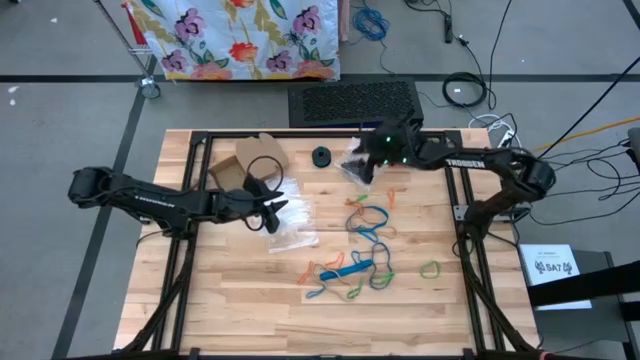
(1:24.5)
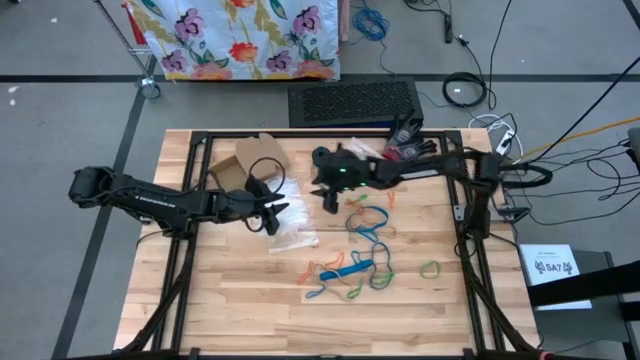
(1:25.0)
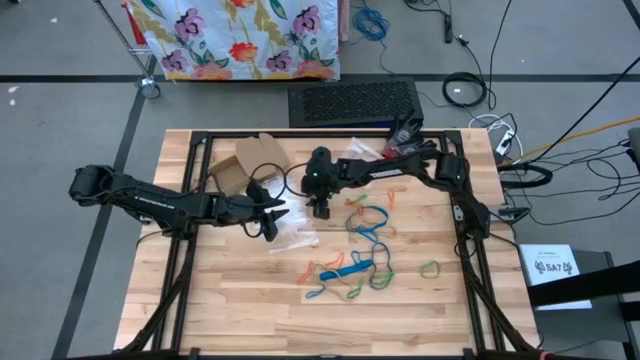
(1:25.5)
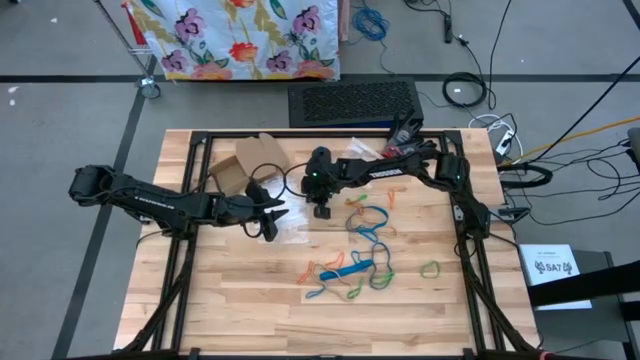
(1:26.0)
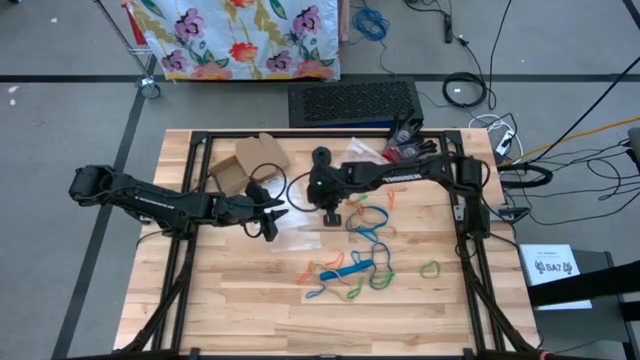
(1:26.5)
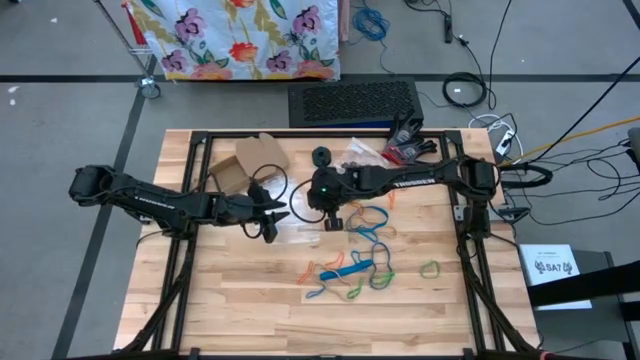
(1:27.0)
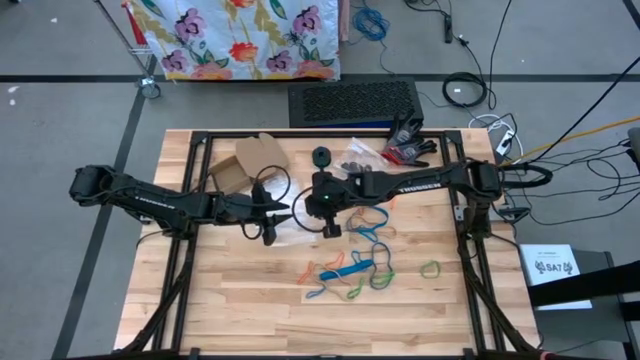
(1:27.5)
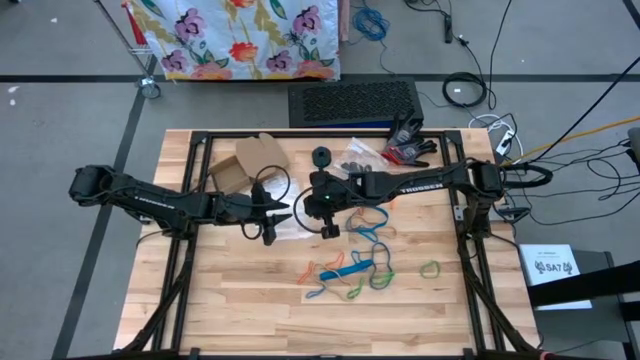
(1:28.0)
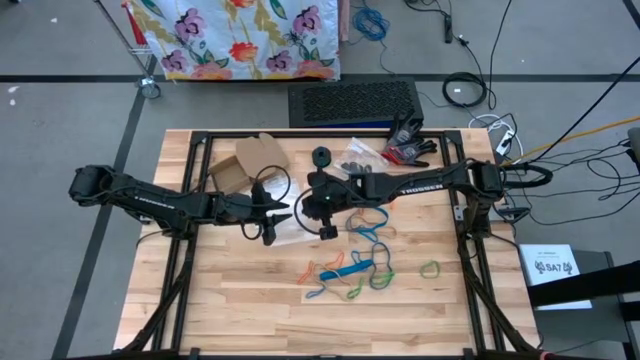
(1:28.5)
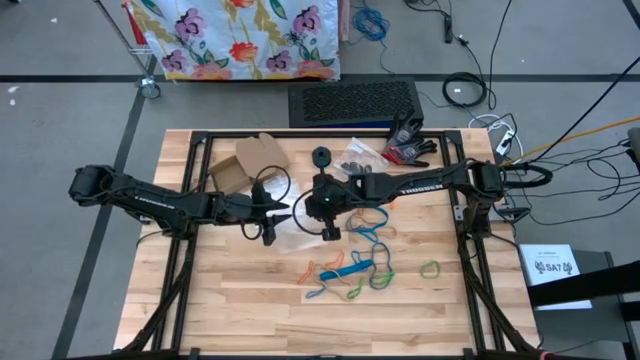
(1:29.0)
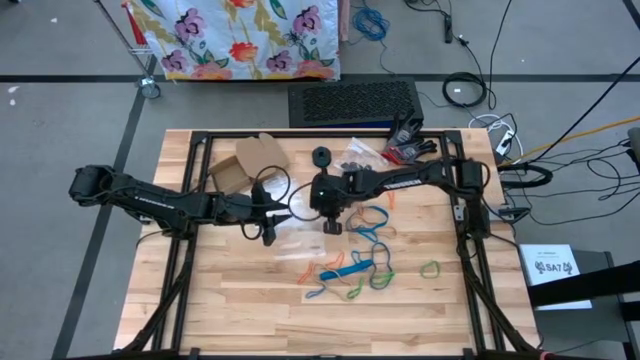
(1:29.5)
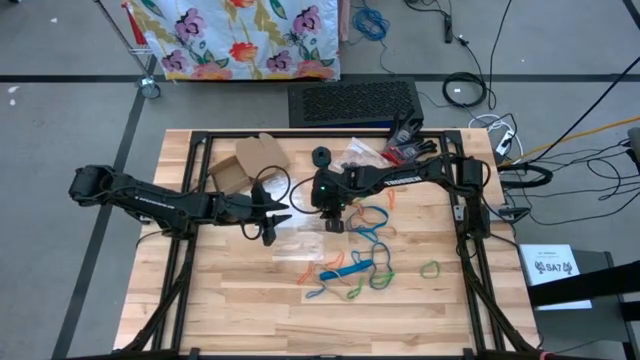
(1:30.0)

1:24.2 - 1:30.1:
Task: Sort rubber bands
Open the transparent zip bag

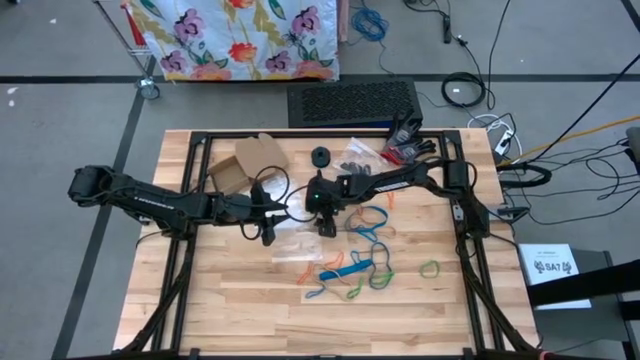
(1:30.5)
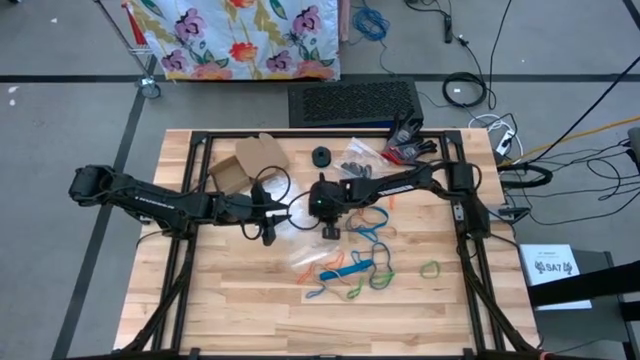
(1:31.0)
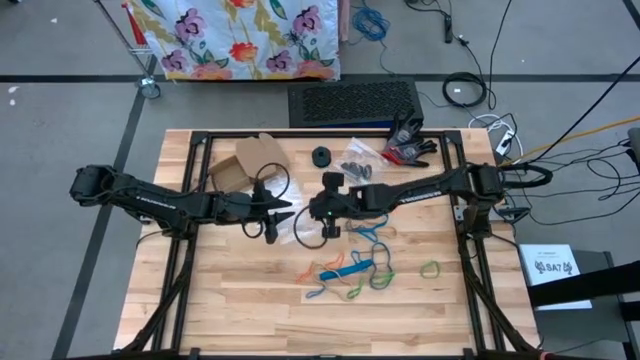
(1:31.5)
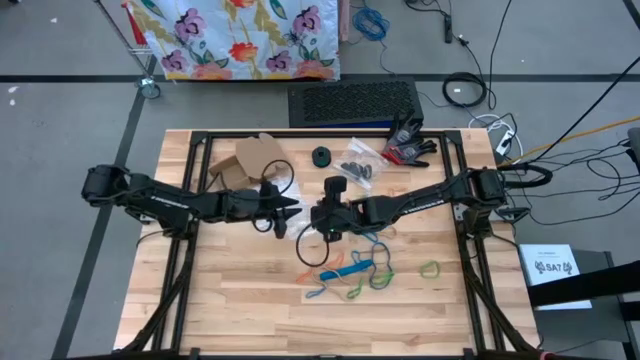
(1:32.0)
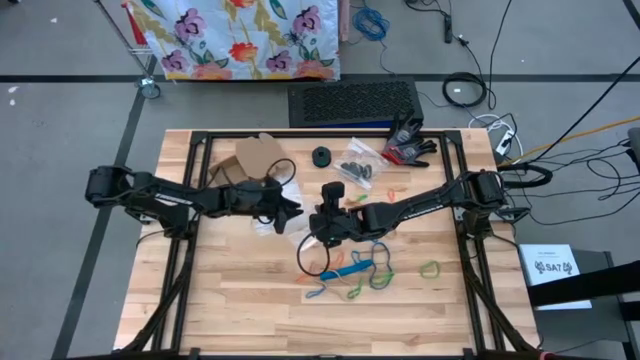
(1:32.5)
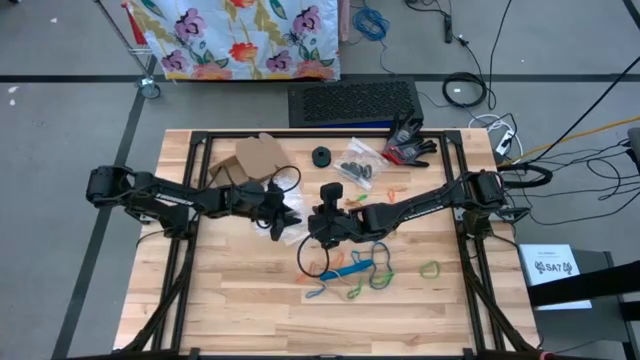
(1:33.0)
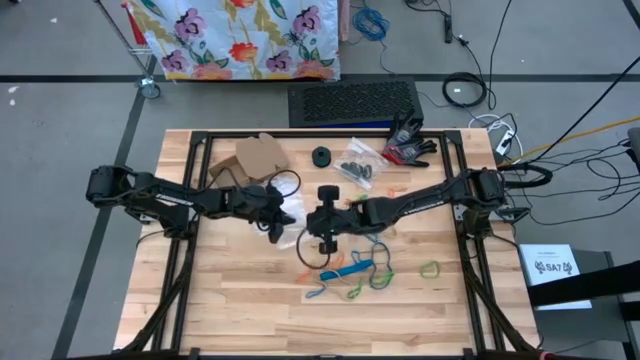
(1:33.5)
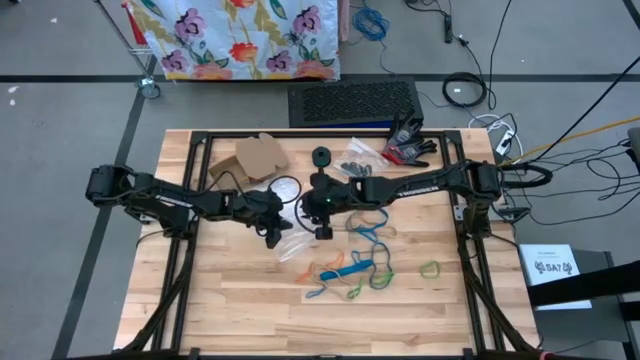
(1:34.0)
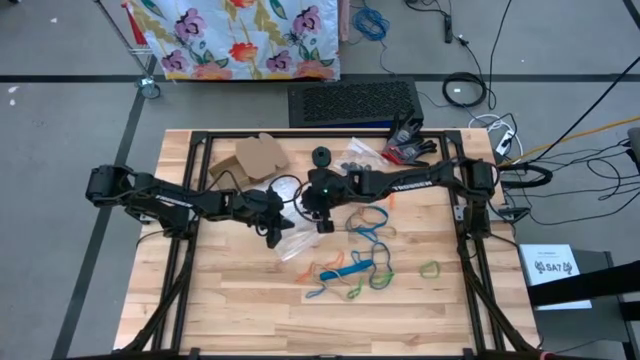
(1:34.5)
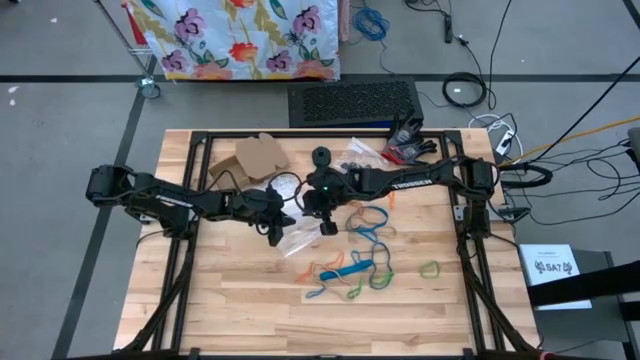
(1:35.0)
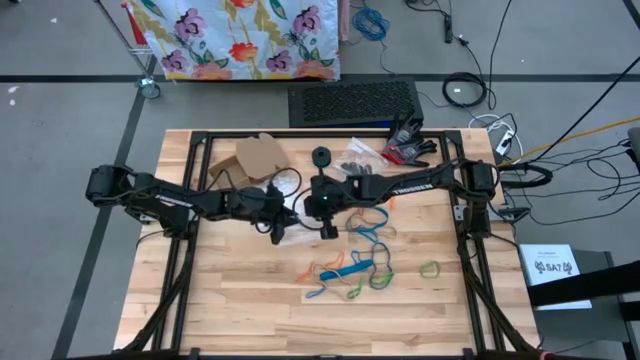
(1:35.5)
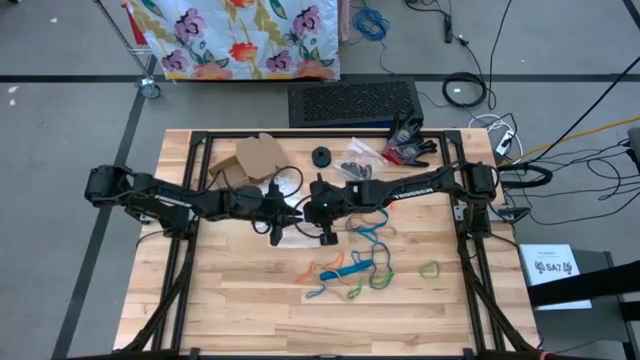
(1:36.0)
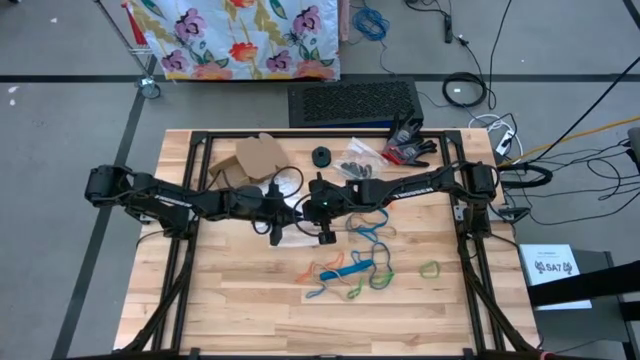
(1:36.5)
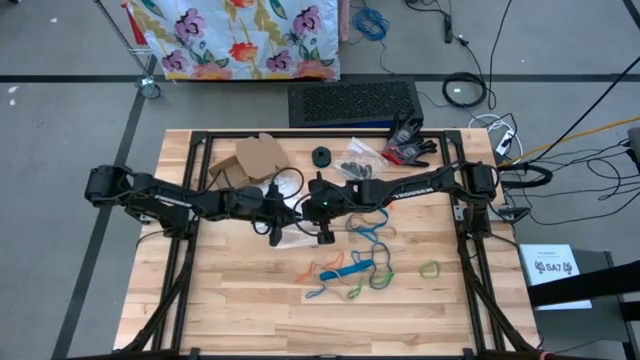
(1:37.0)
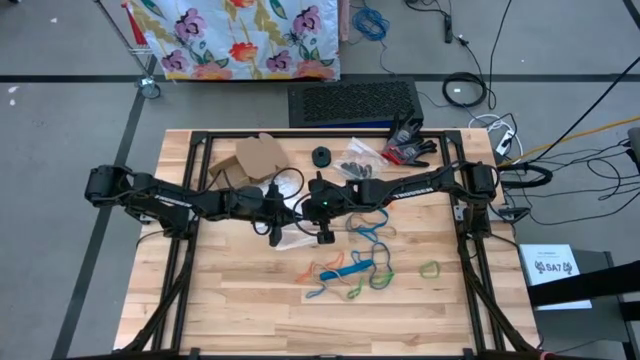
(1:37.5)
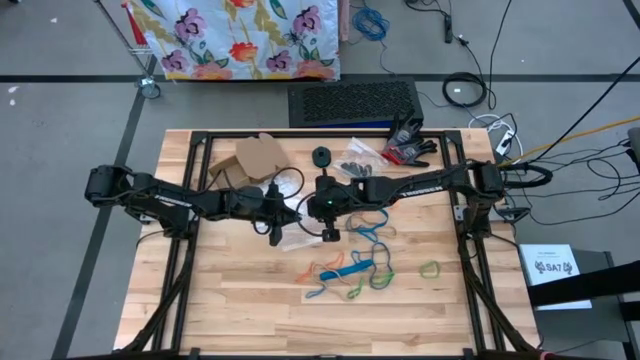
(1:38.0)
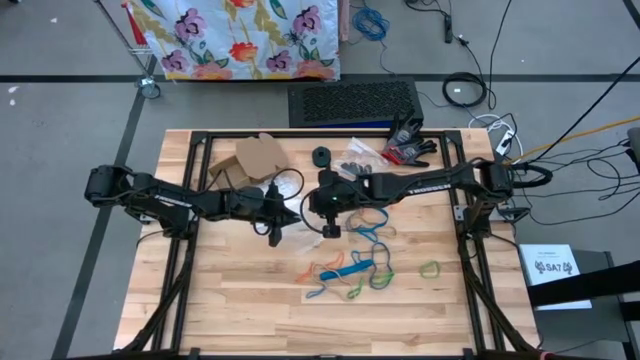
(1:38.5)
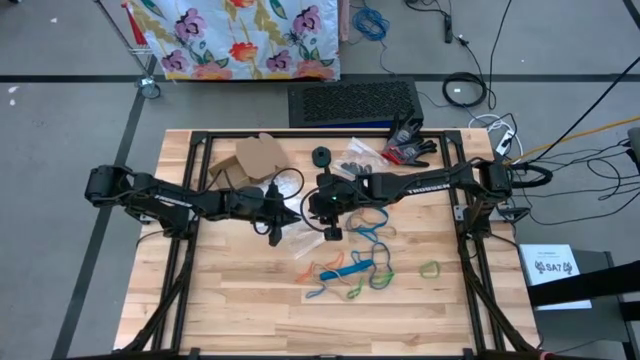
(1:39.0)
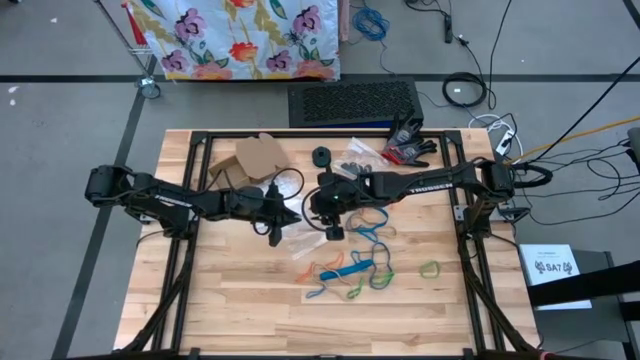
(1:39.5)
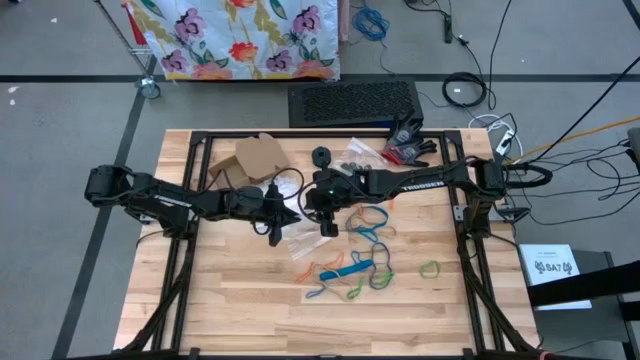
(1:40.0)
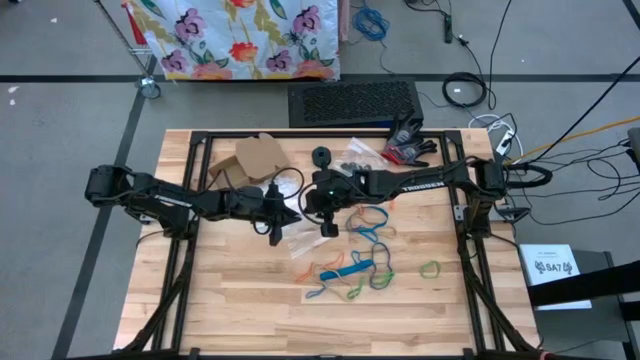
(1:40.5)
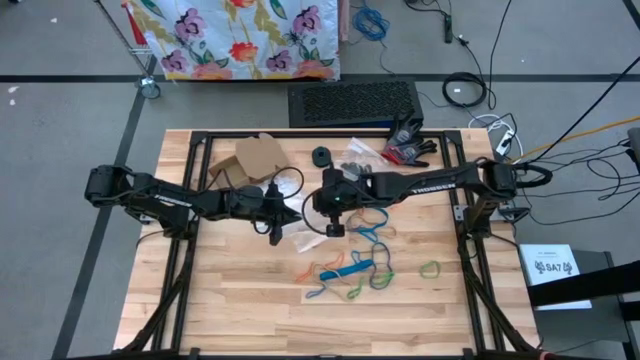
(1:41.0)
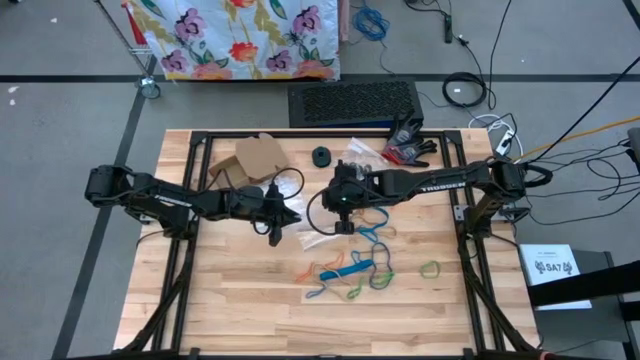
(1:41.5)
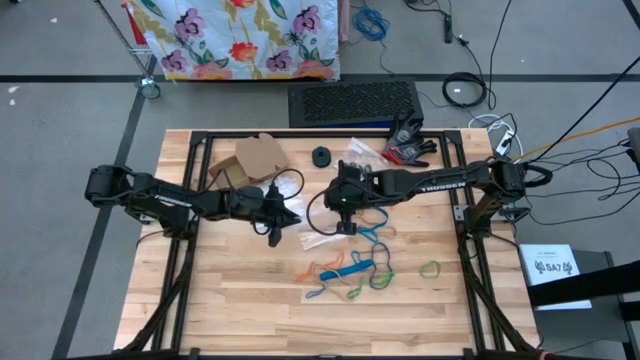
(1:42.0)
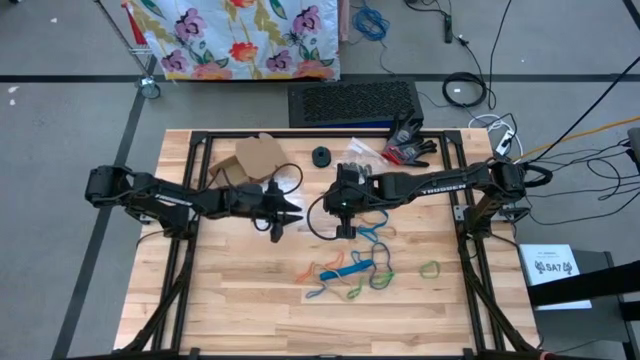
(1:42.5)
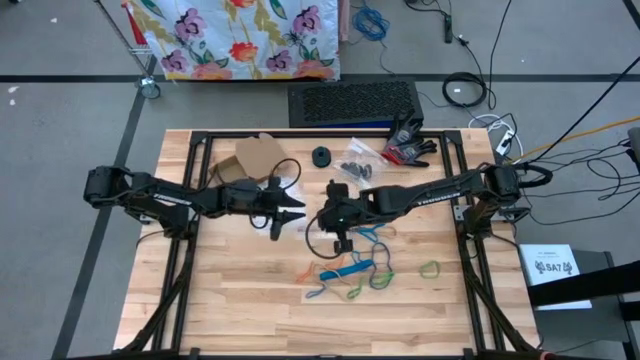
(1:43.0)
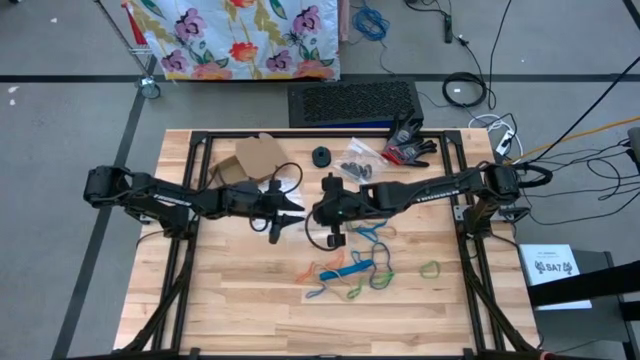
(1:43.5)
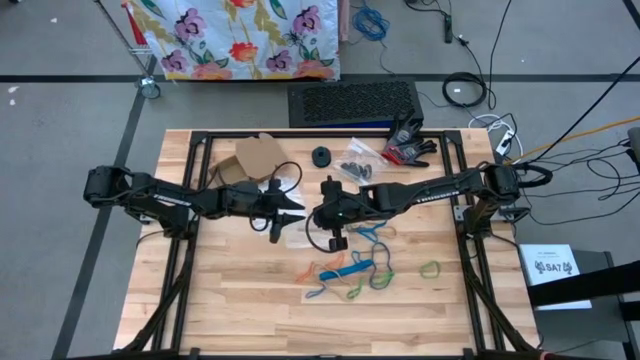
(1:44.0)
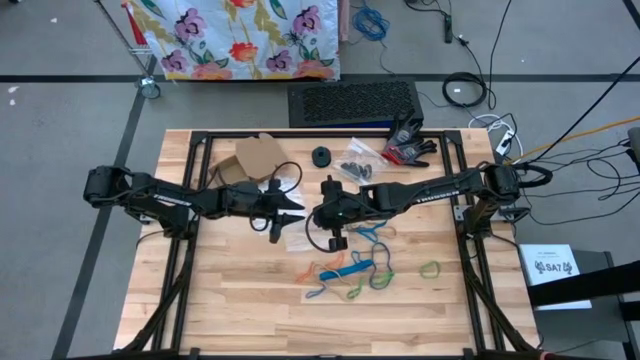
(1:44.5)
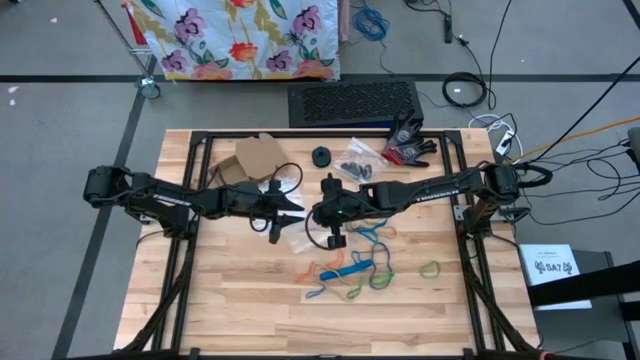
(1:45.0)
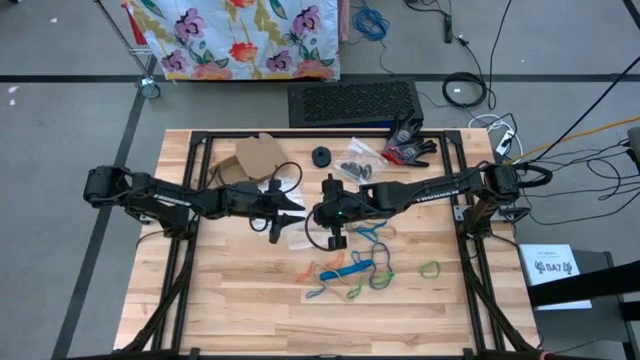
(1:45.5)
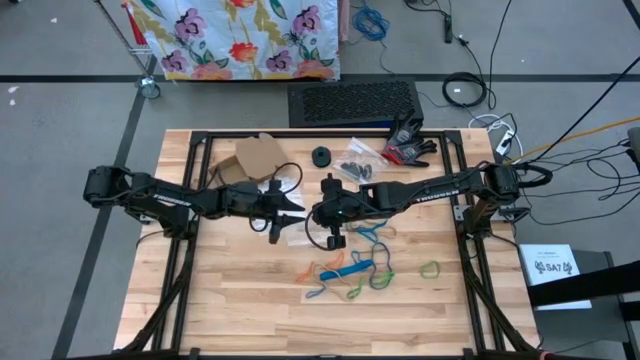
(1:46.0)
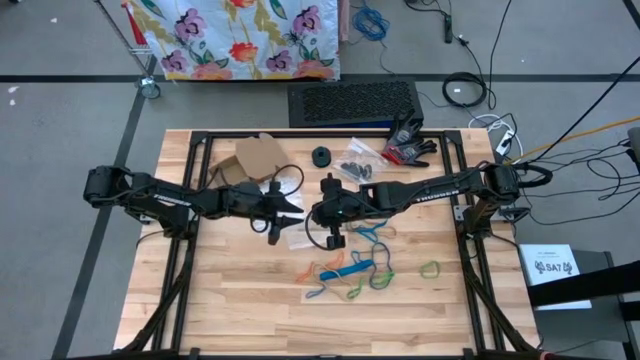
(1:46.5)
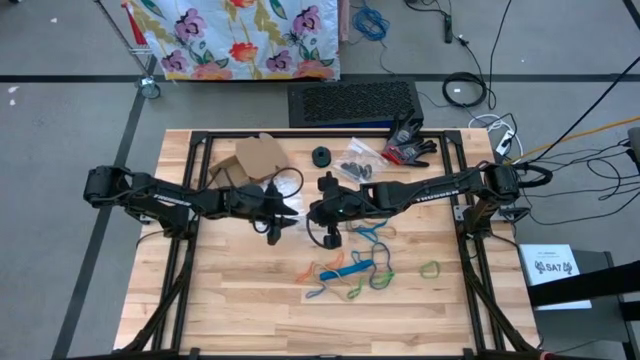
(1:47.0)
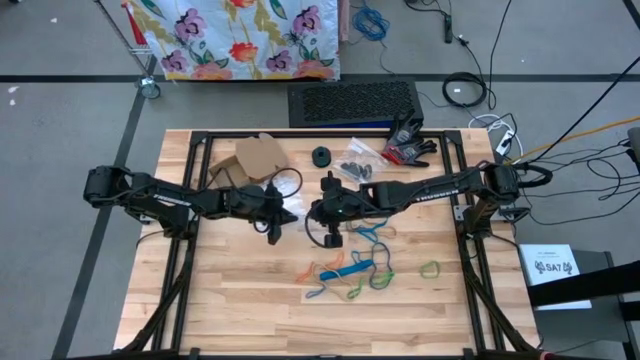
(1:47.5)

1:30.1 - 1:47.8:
Open the transparent zip bag
